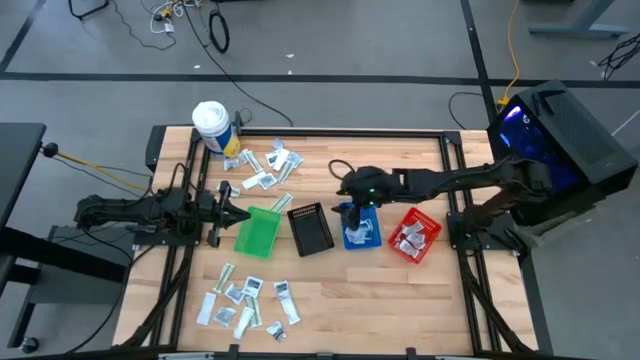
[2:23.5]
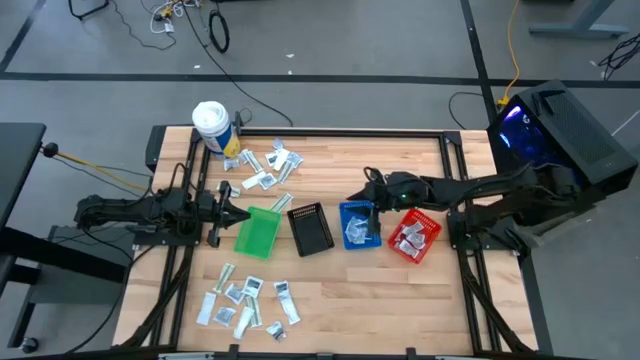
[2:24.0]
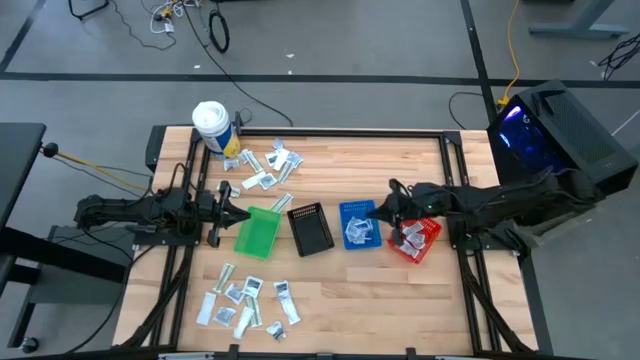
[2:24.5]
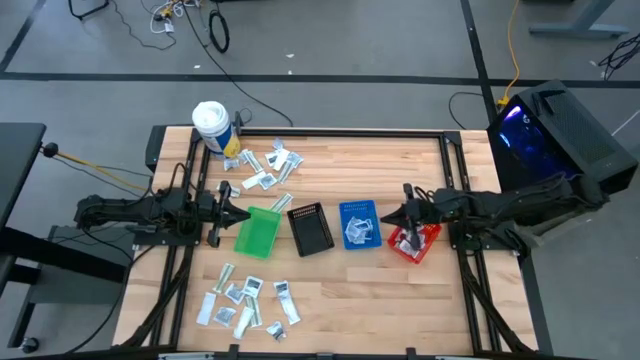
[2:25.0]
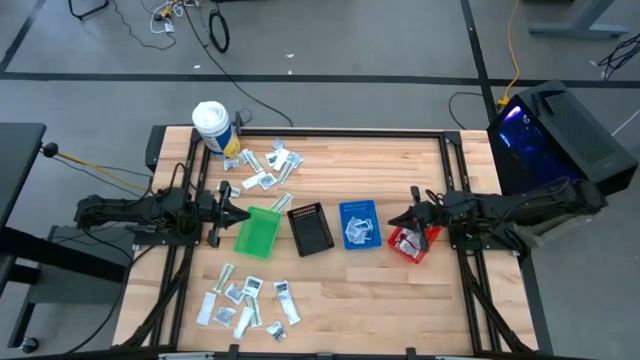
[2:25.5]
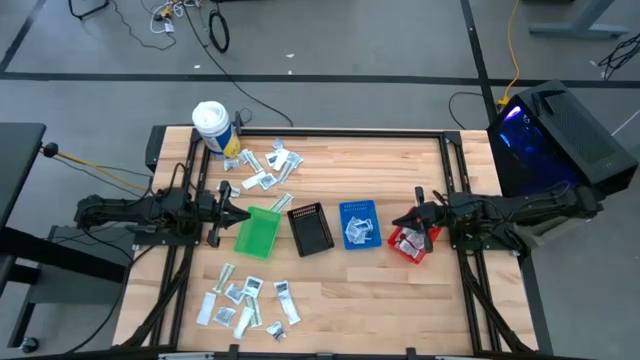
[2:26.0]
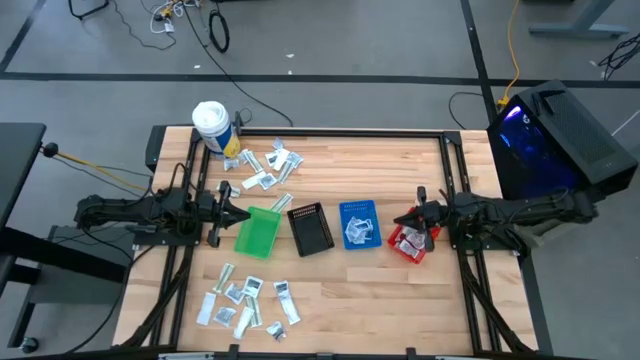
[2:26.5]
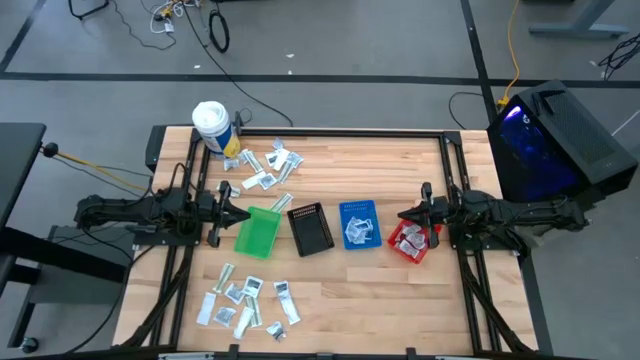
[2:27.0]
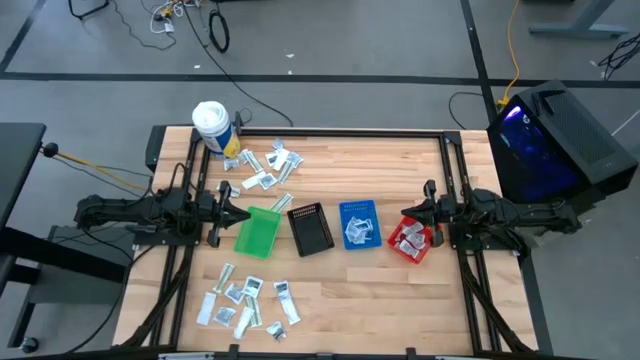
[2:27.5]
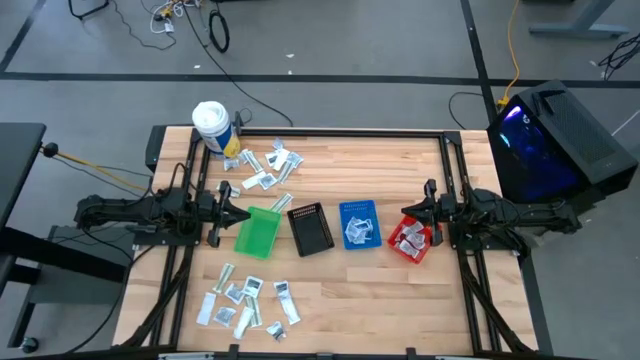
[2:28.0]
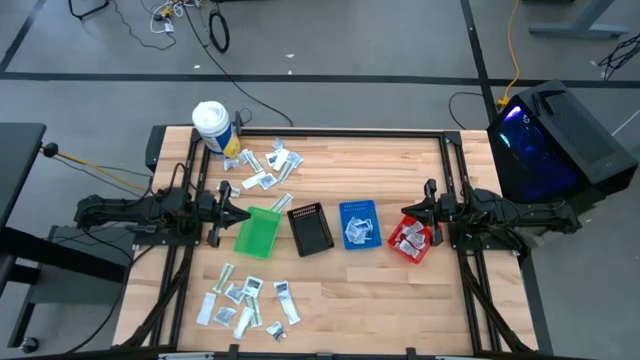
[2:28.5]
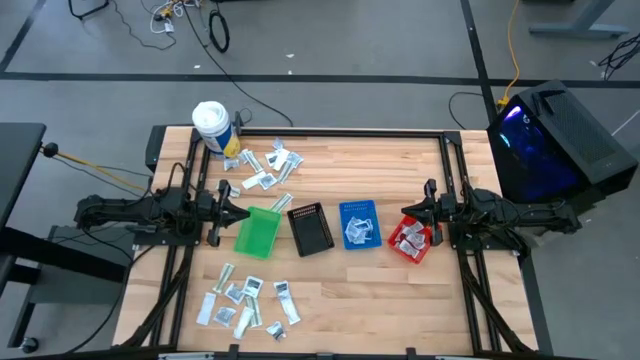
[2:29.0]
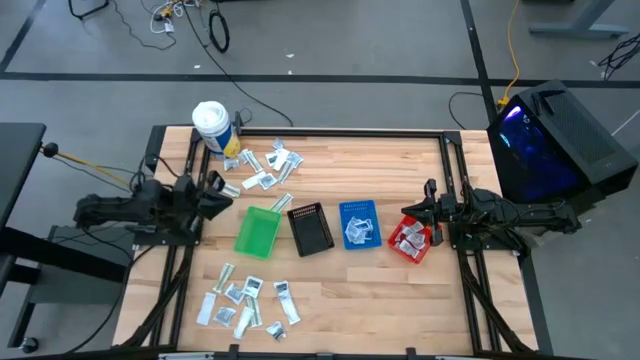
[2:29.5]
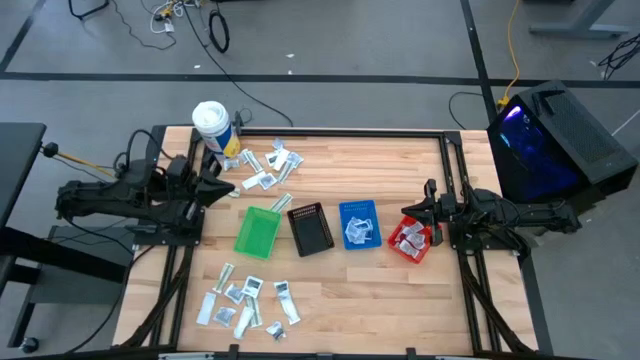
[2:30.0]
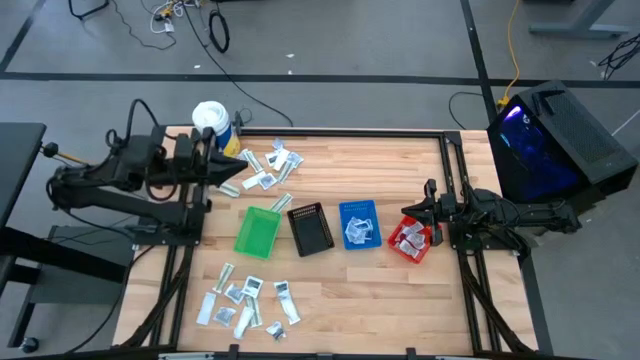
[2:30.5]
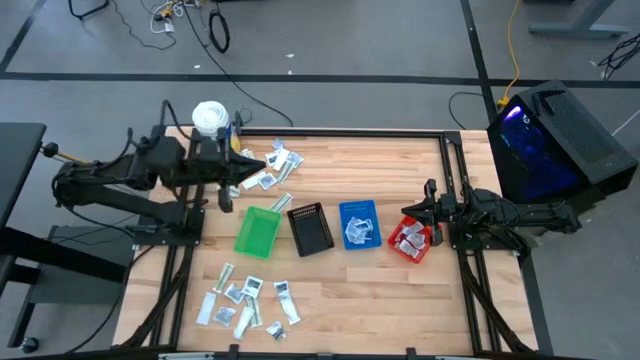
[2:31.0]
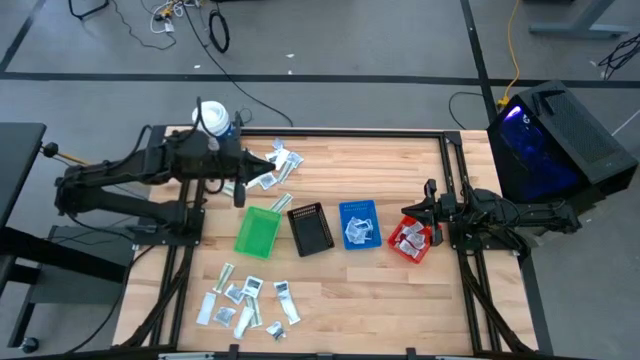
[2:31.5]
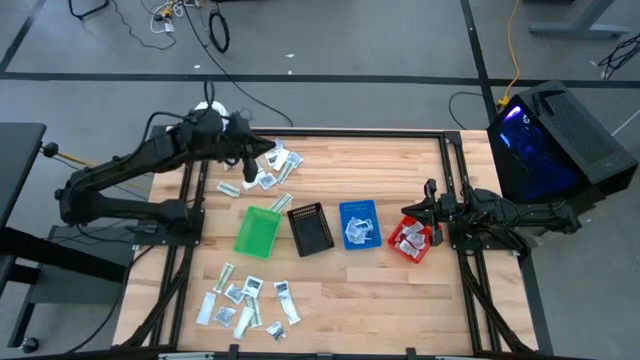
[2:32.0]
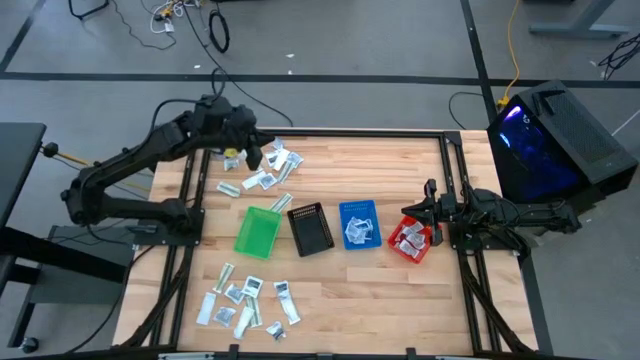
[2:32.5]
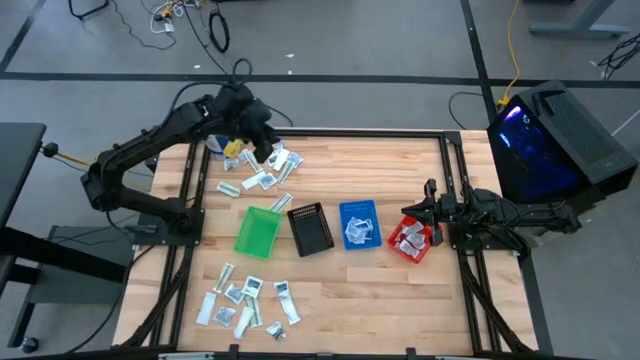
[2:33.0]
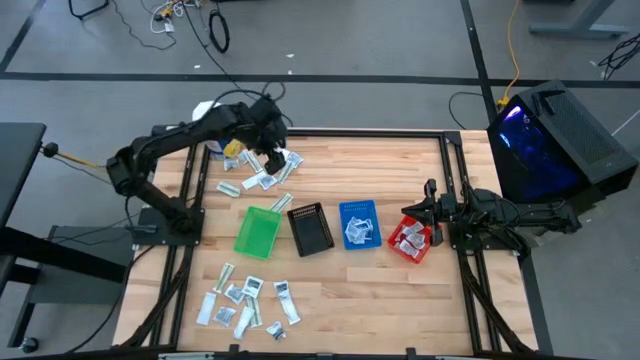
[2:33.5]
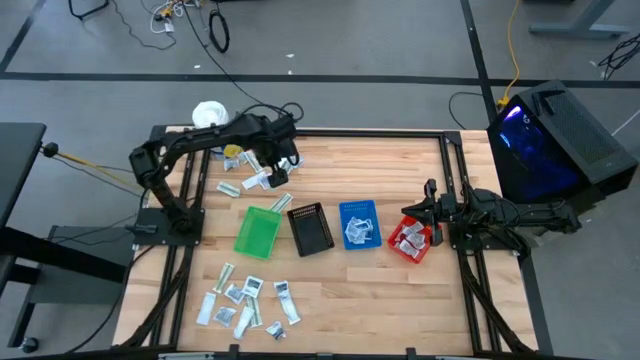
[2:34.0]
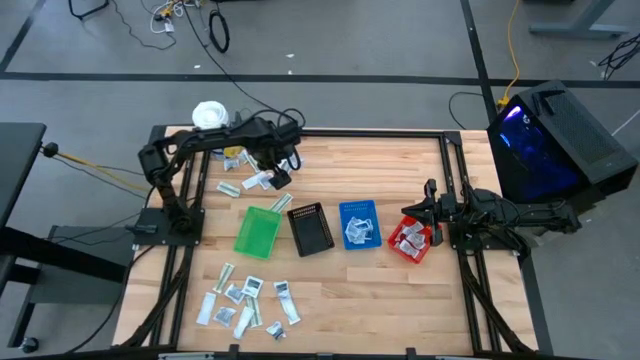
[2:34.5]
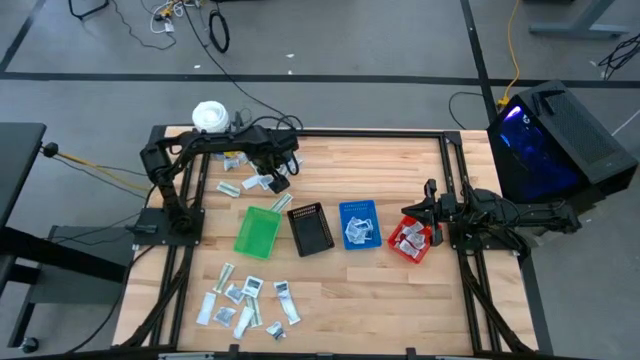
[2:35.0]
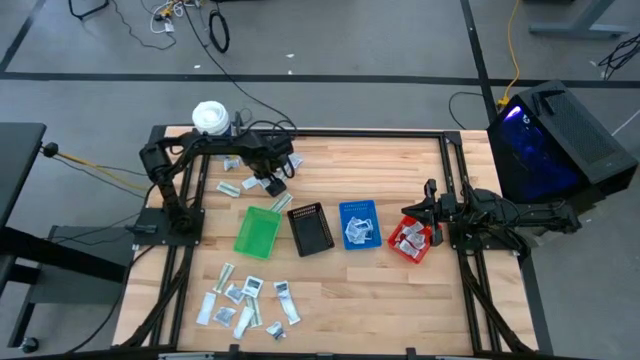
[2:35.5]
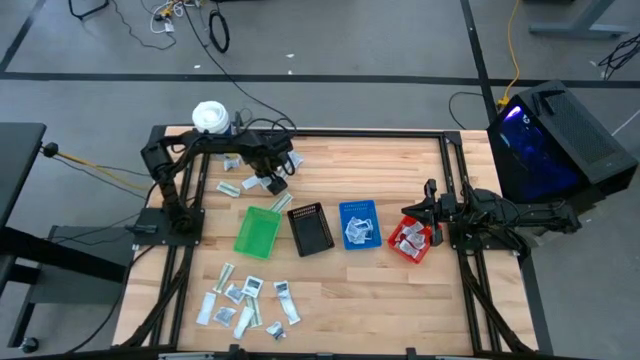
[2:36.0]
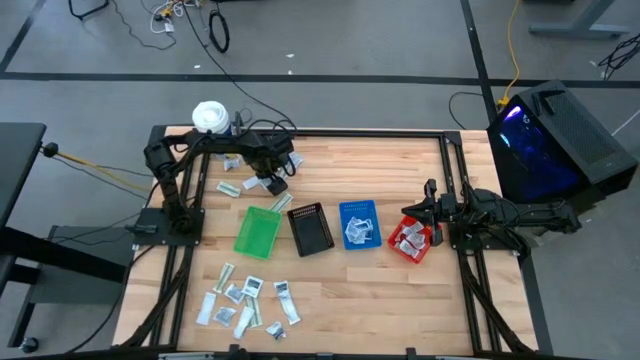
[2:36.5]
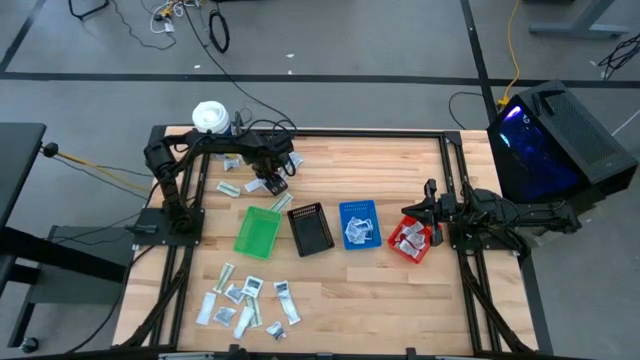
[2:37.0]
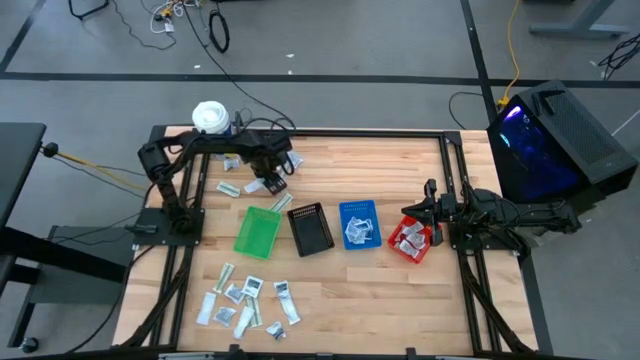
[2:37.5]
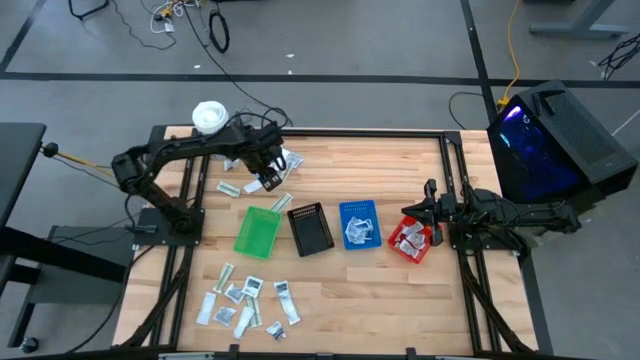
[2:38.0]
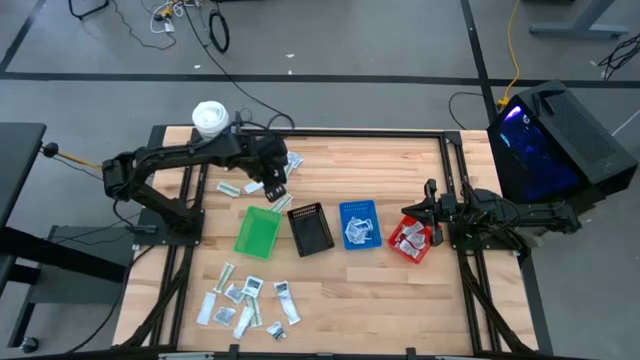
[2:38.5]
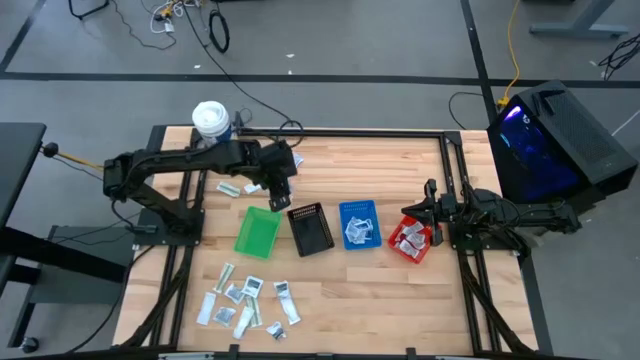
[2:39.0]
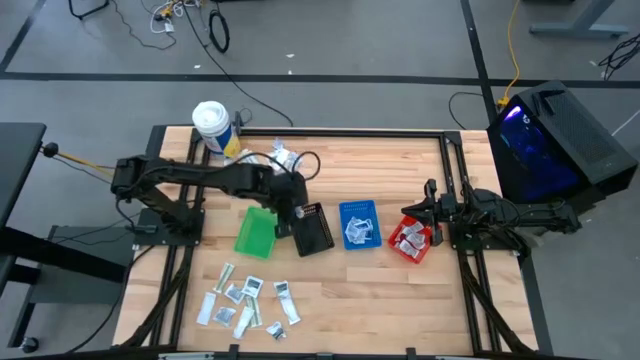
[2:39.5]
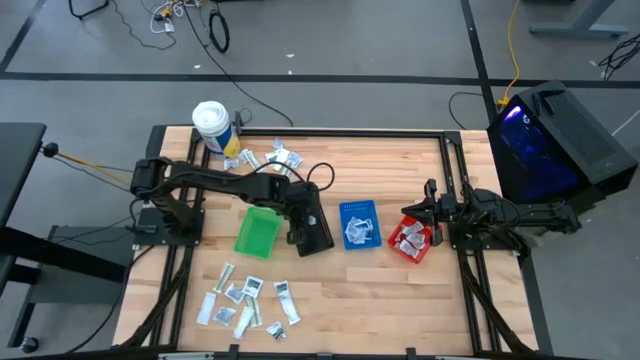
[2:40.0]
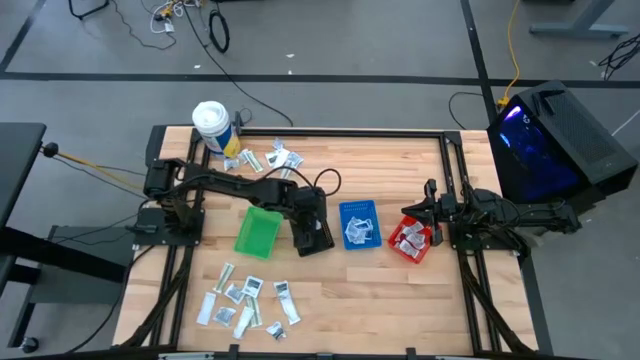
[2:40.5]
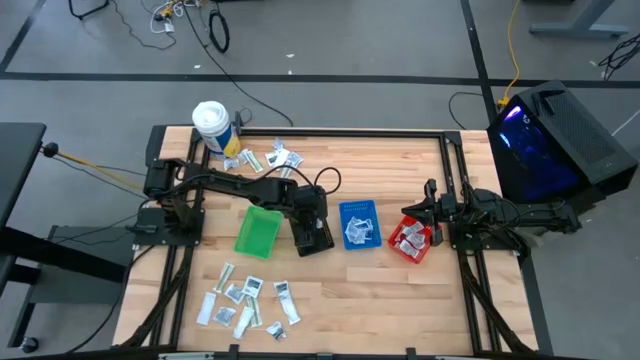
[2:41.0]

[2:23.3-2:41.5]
Task: Pick & Place First Aid Supplies
Put the towelette pack into the black basket
